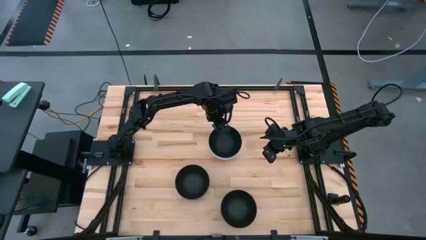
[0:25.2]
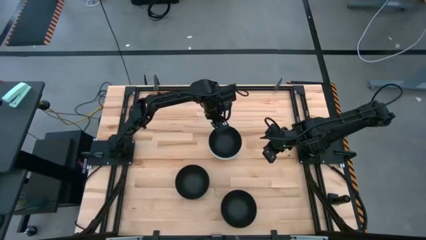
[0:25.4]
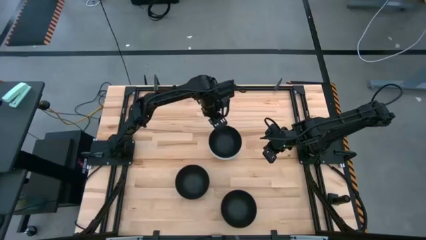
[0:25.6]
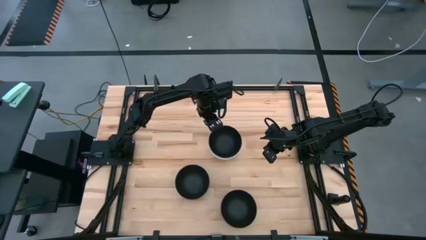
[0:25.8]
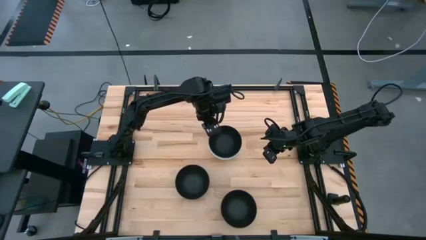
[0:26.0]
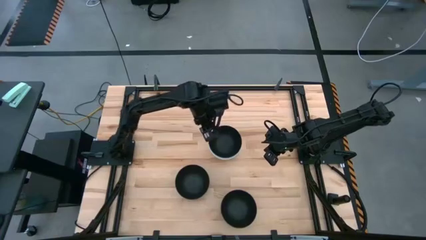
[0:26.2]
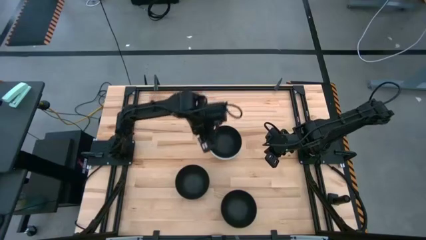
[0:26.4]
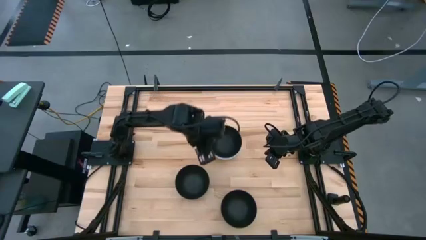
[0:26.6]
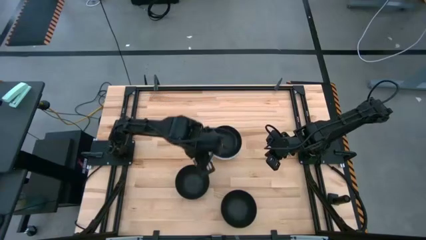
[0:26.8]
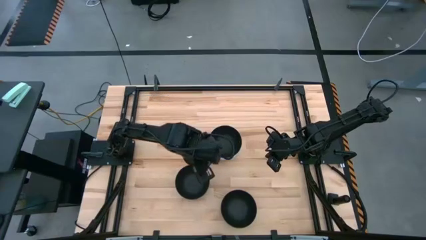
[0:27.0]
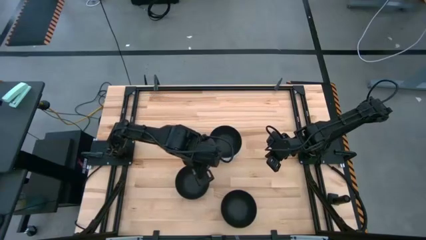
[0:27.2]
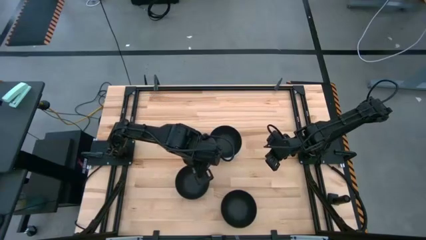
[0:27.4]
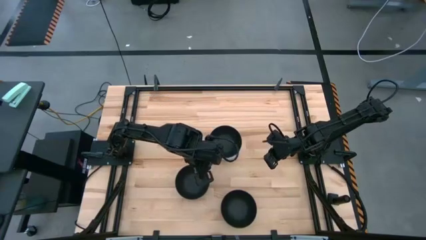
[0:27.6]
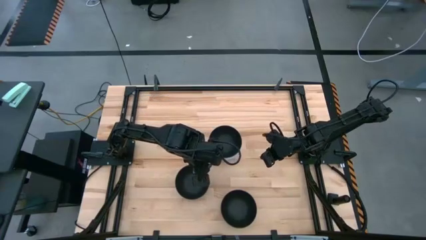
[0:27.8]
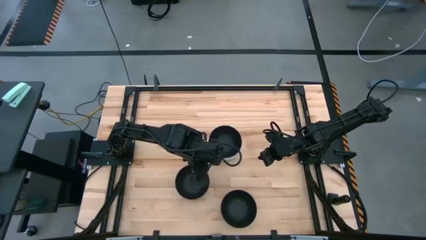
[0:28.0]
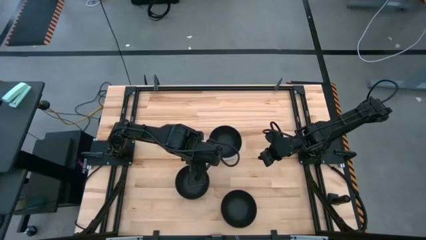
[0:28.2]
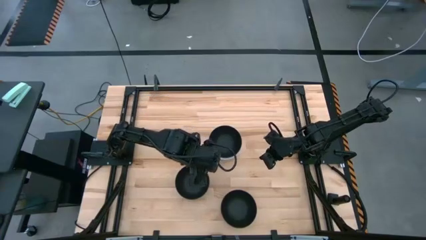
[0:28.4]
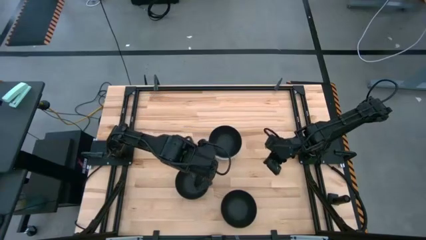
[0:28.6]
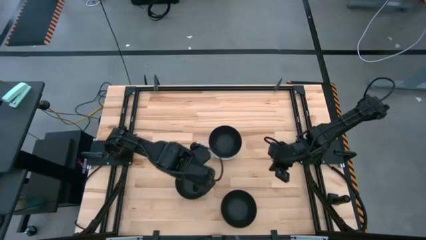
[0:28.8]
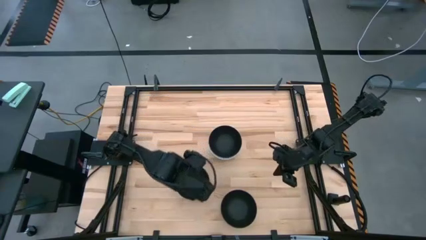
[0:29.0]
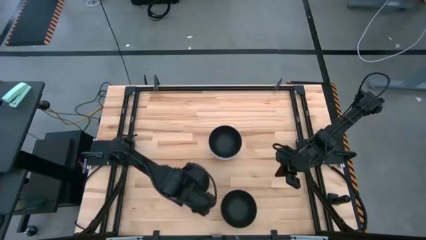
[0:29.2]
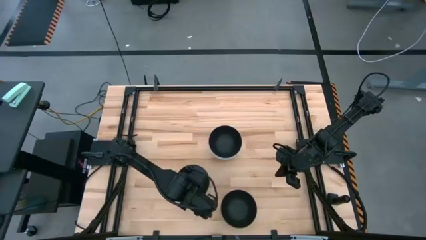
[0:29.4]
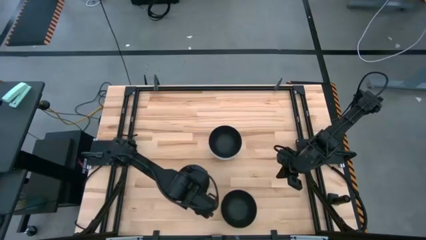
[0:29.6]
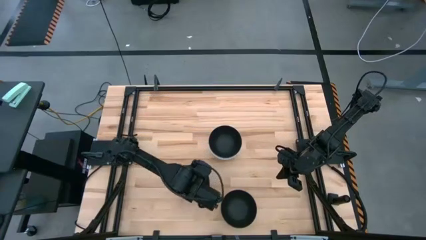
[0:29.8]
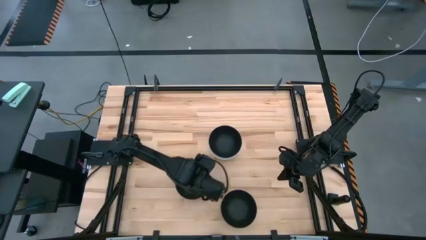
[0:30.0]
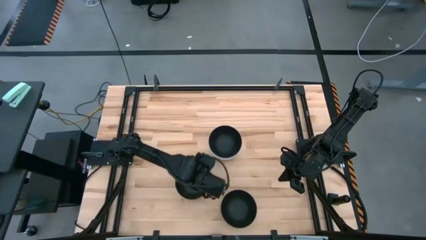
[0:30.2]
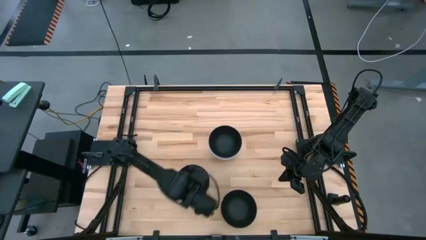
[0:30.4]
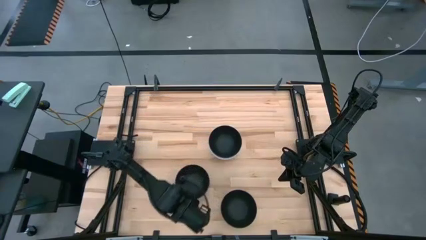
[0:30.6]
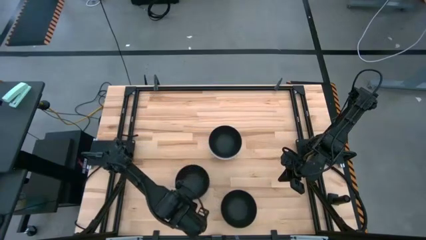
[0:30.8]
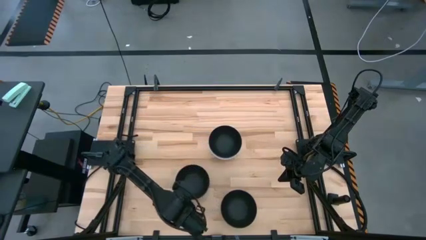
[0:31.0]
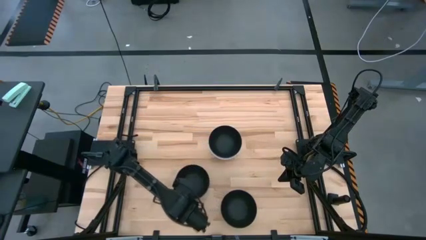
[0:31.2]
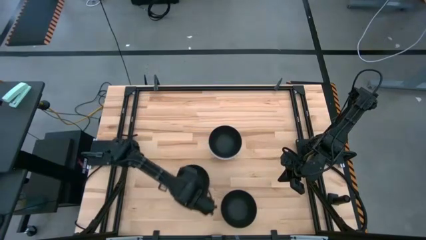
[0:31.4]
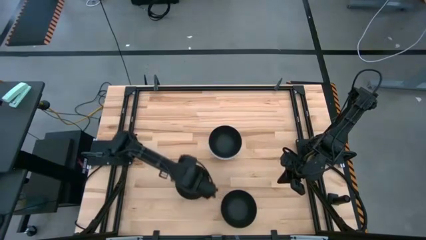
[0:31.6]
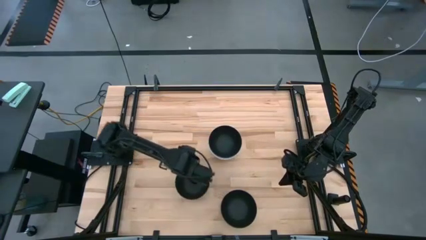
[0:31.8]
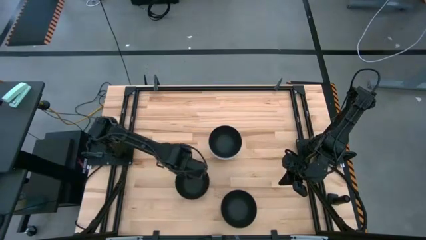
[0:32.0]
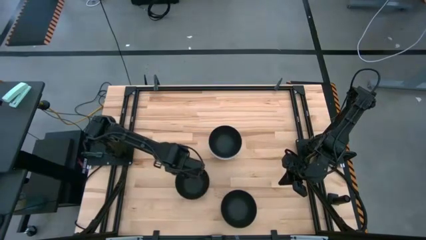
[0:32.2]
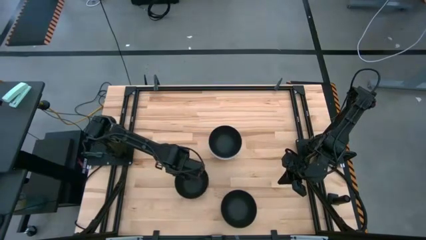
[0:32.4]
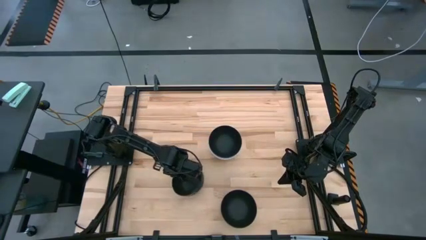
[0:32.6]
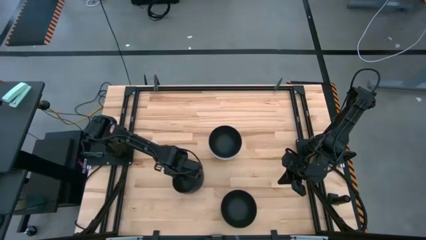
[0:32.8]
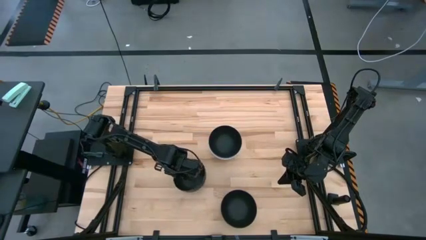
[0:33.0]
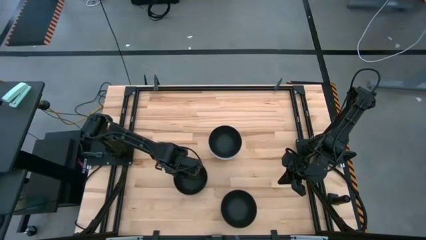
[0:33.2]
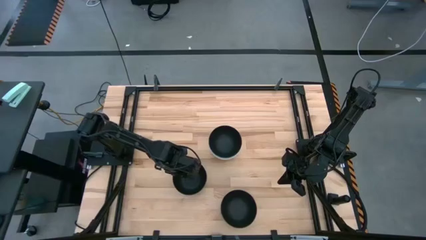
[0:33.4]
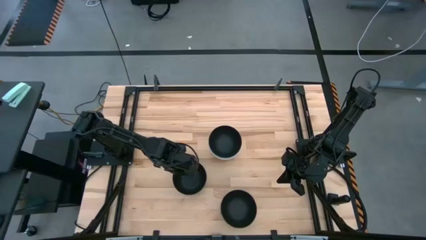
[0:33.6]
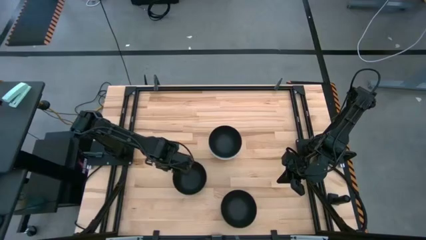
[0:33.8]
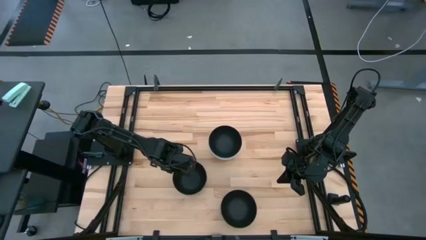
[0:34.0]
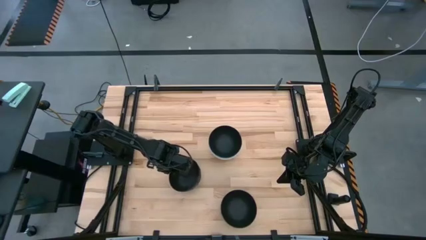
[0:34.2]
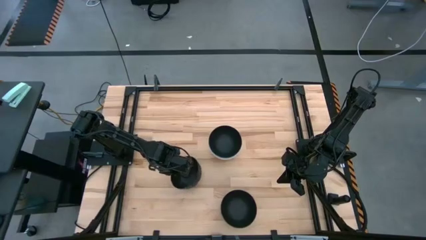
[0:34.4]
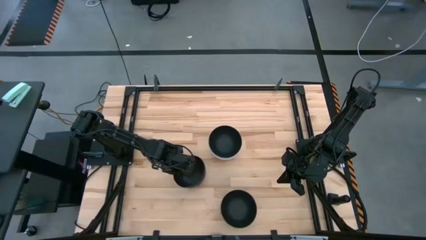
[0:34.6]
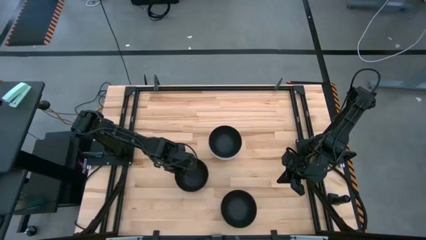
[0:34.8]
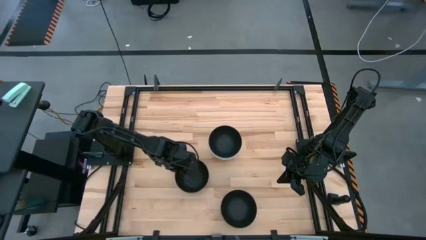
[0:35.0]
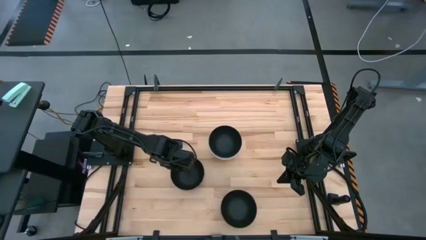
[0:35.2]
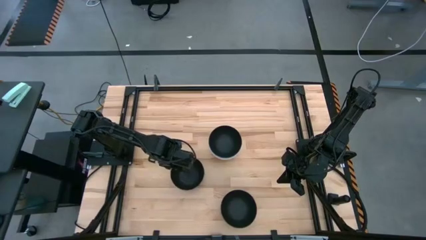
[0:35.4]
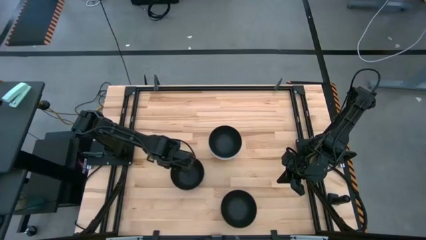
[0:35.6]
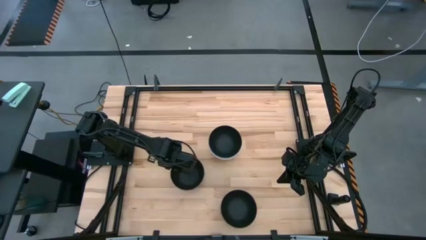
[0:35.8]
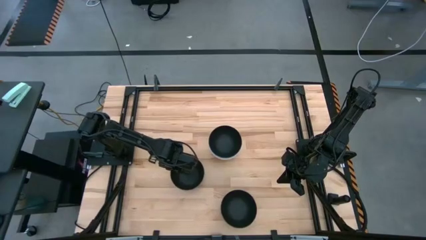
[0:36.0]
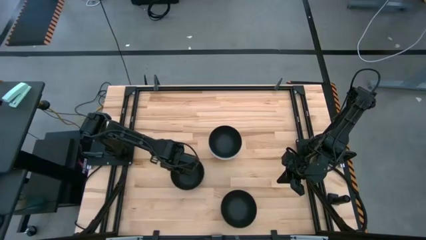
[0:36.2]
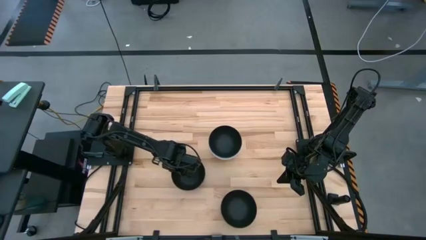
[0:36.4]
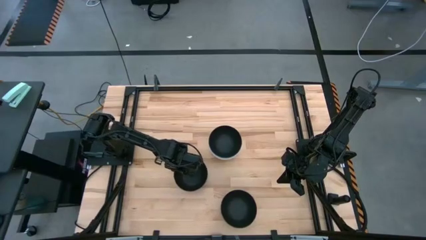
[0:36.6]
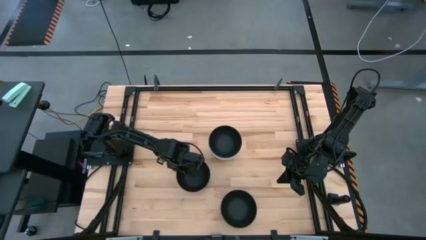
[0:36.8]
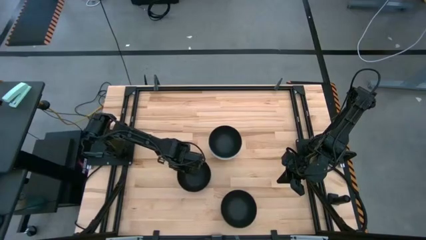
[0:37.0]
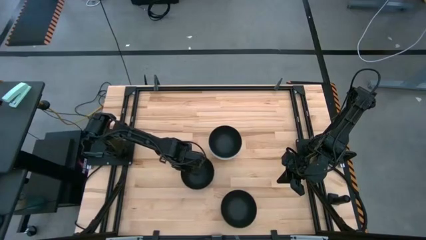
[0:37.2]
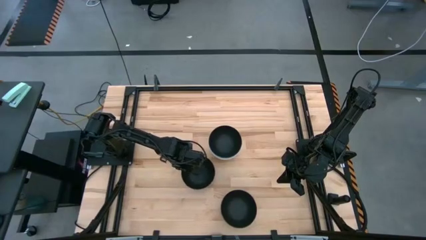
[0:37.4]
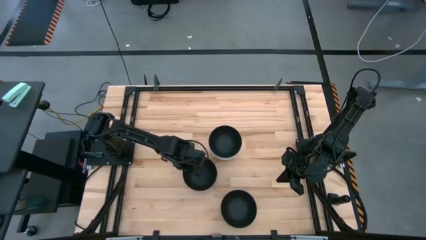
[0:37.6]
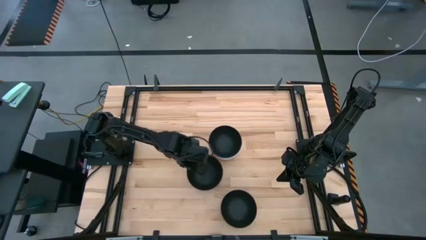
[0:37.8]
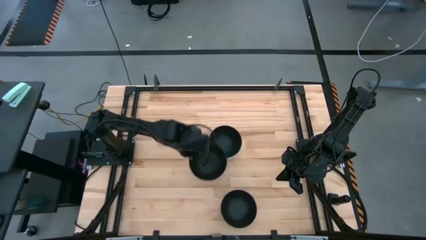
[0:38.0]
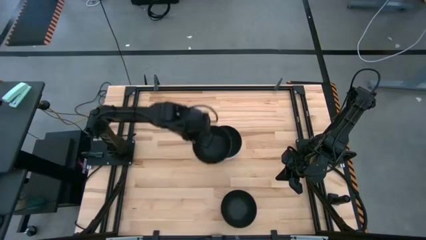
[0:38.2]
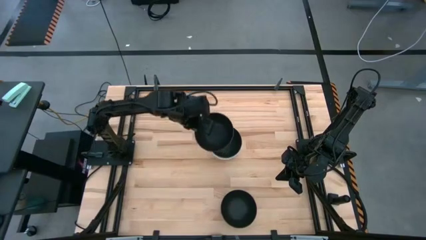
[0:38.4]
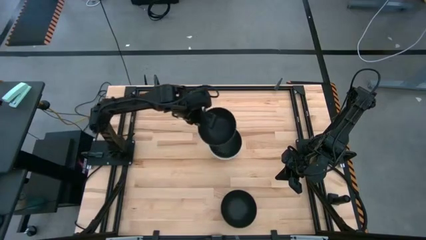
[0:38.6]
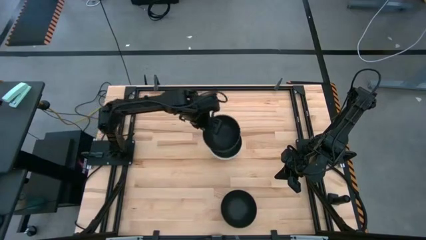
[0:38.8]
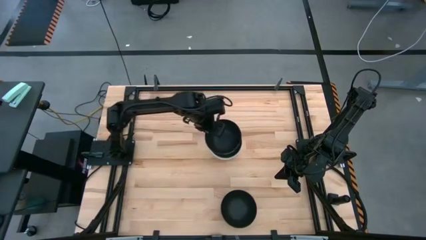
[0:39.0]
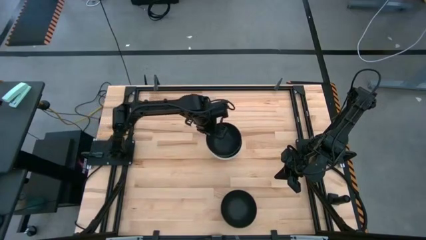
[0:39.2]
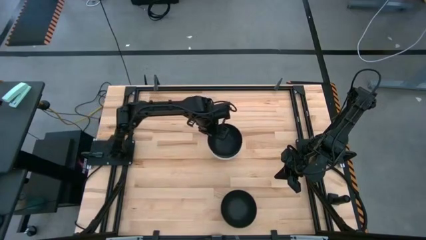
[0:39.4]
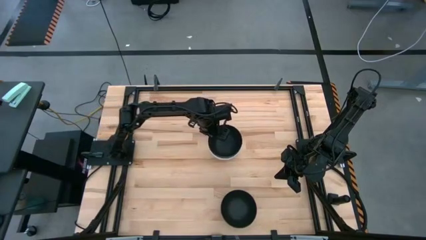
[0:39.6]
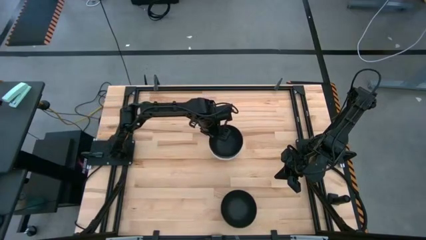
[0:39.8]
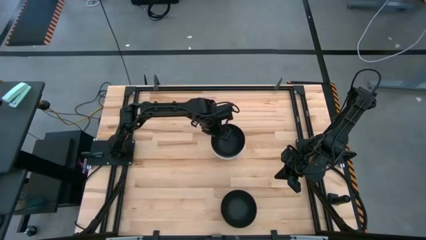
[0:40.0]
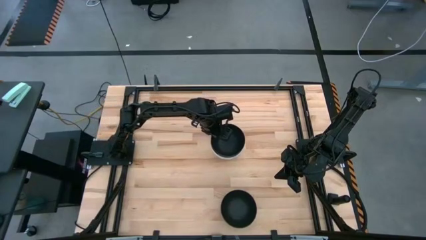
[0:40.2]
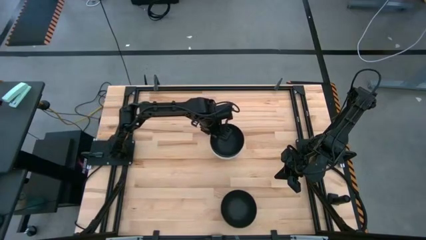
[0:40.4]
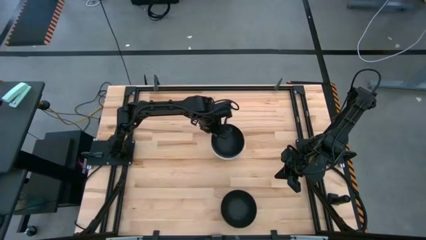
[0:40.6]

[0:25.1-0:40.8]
Task: Nest bowls inside each other
Stack the left black bowl on the black bowl

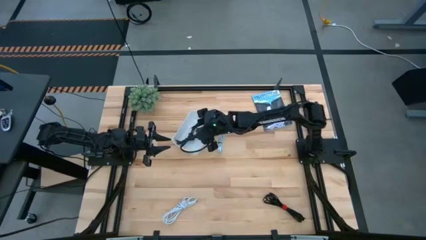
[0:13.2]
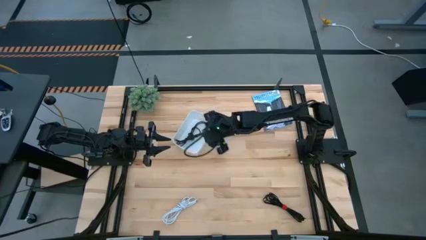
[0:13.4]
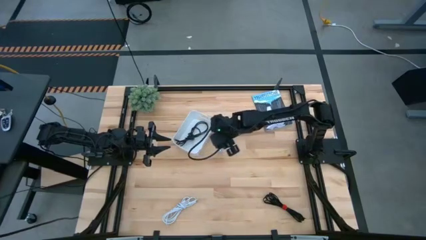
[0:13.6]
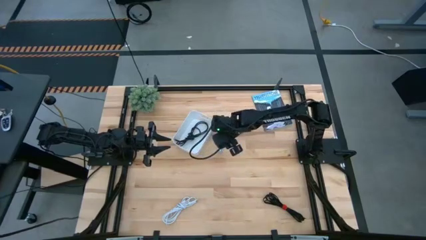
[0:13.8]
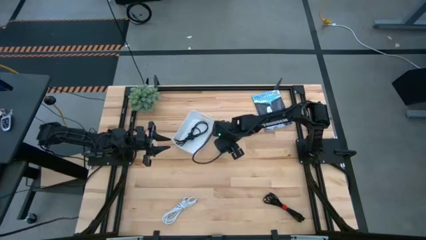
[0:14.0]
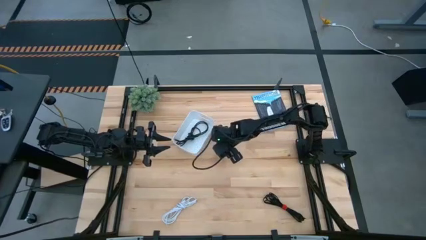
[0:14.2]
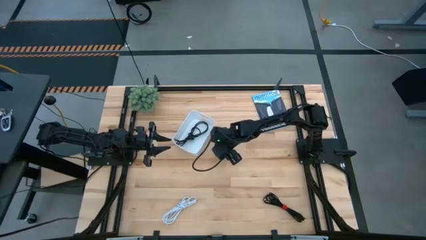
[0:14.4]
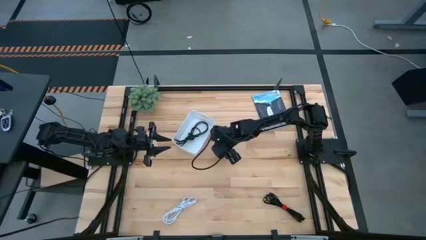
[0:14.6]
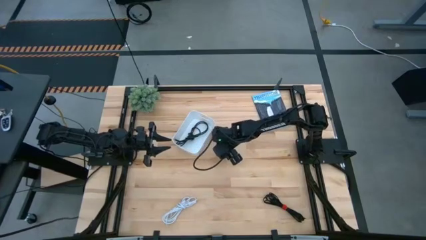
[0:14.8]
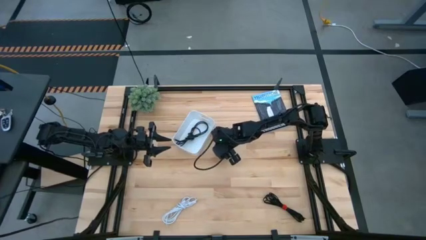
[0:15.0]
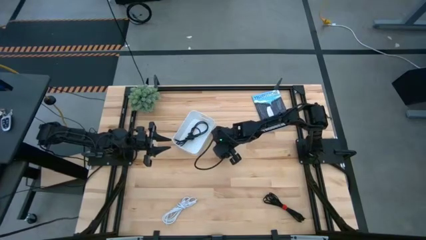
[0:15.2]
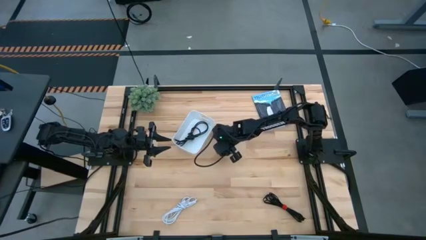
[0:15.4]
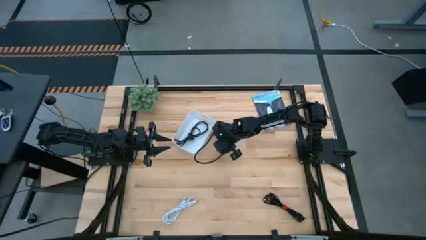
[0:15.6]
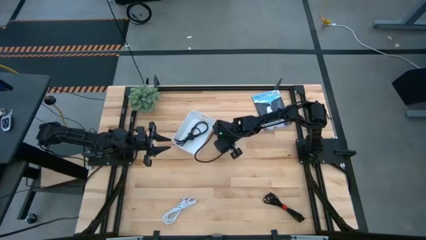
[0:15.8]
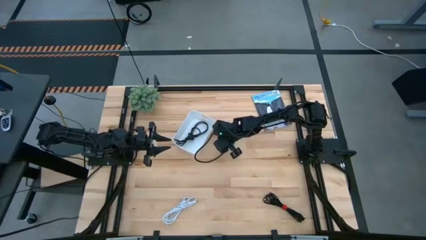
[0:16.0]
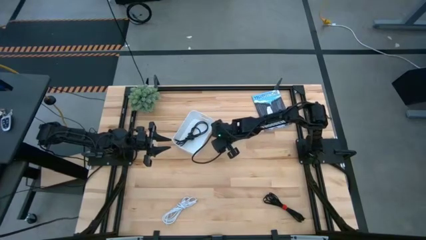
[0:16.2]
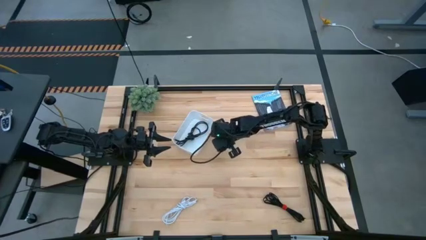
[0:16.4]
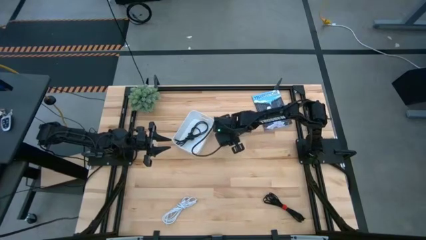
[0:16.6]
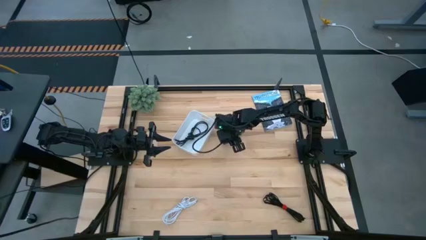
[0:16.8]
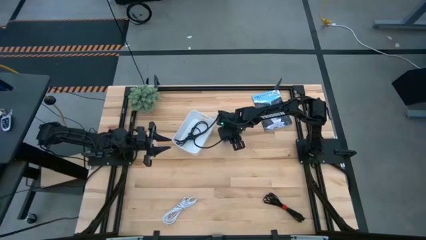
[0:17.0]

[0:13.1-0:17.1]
Task: Pick and place USB-C Cables
Put the light blue charger cable into the white bin
